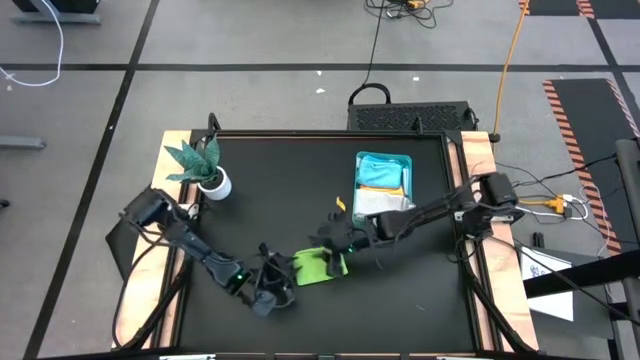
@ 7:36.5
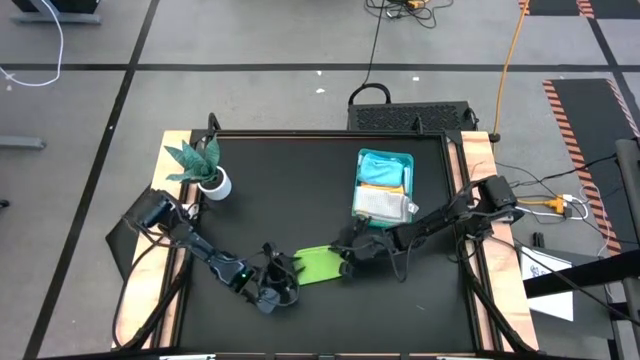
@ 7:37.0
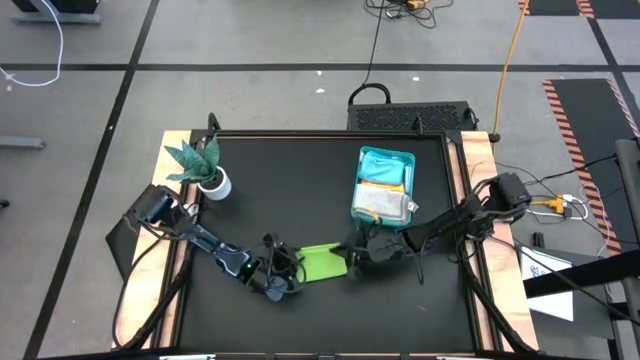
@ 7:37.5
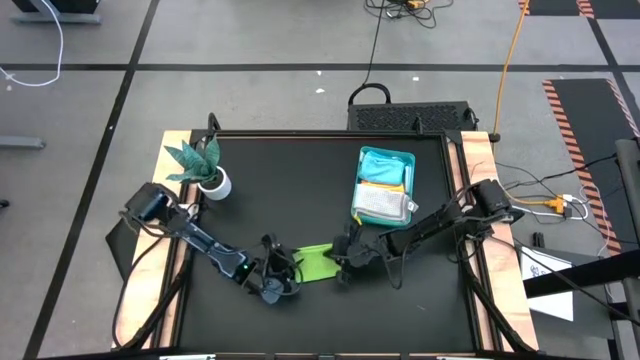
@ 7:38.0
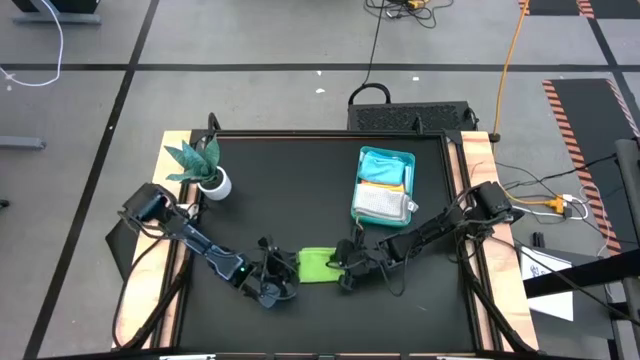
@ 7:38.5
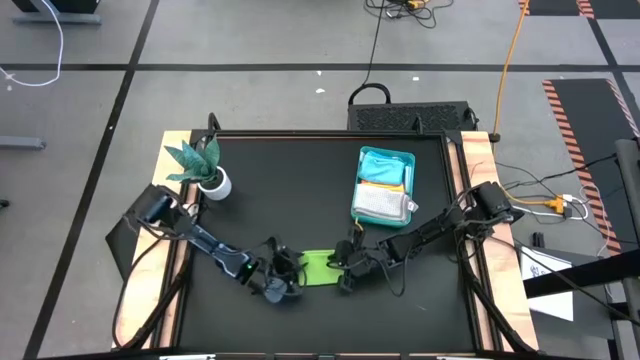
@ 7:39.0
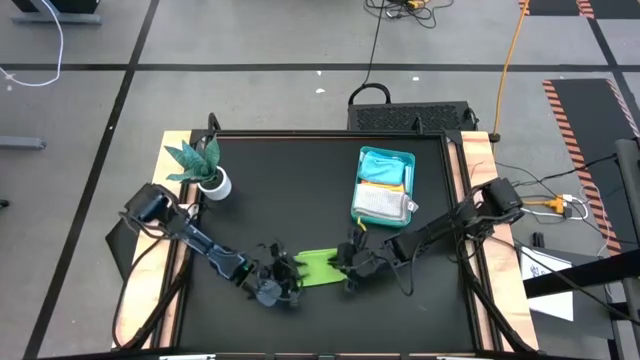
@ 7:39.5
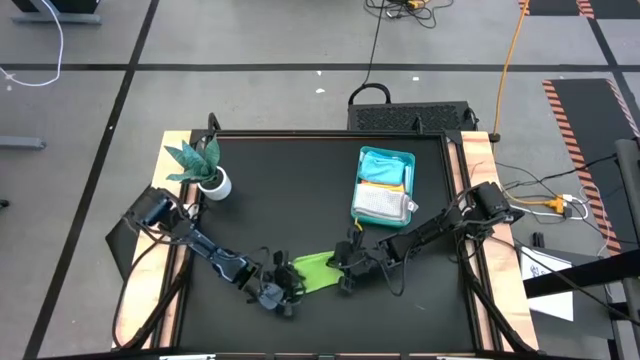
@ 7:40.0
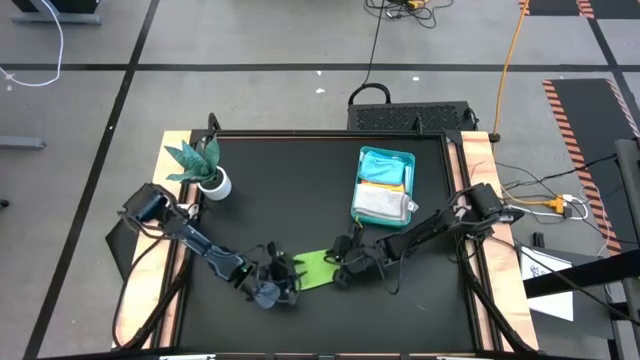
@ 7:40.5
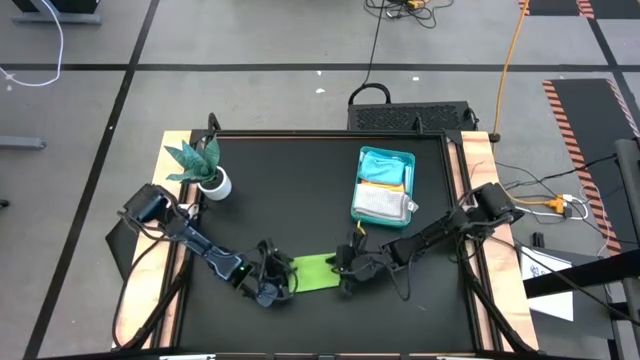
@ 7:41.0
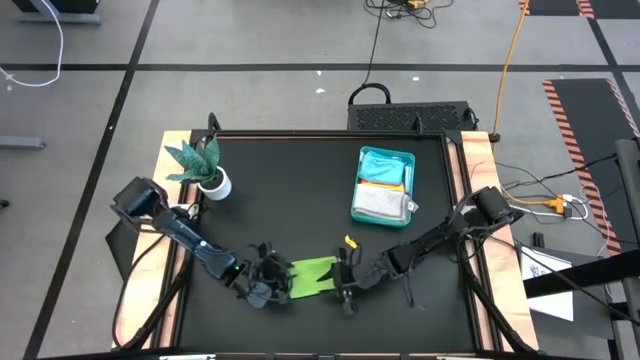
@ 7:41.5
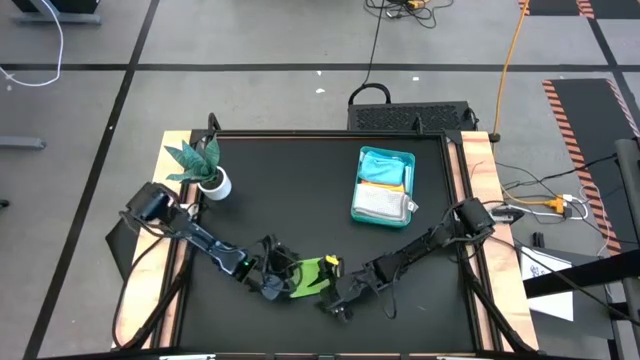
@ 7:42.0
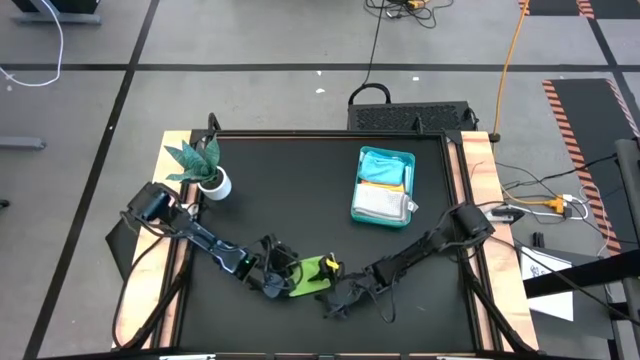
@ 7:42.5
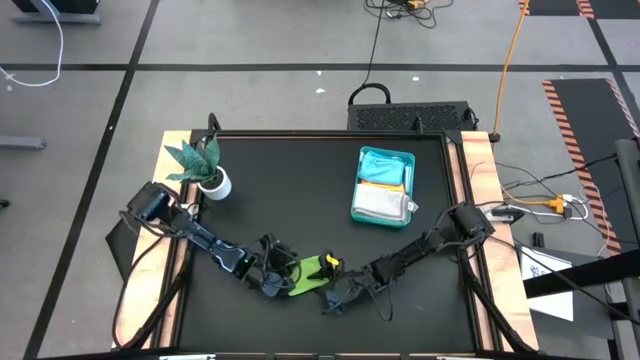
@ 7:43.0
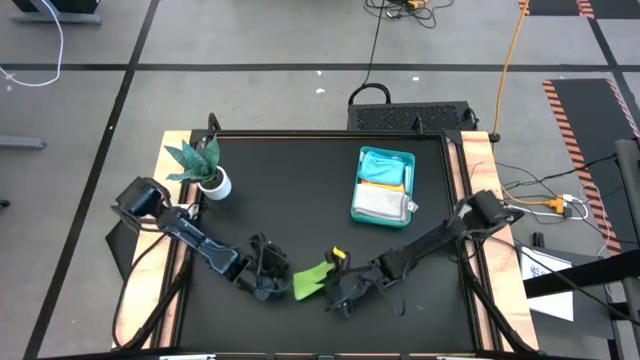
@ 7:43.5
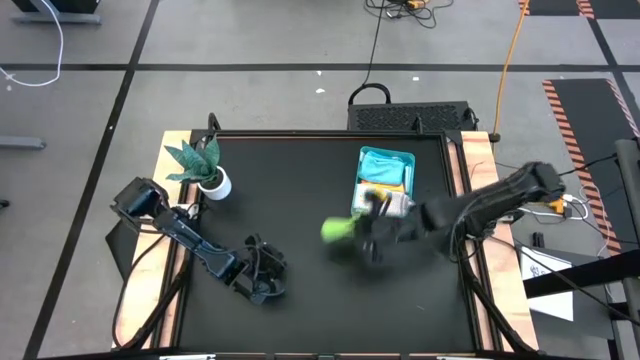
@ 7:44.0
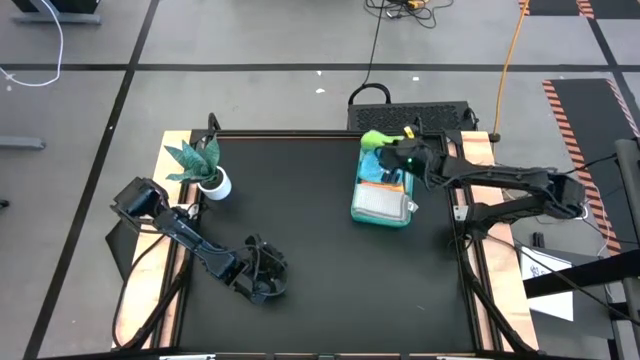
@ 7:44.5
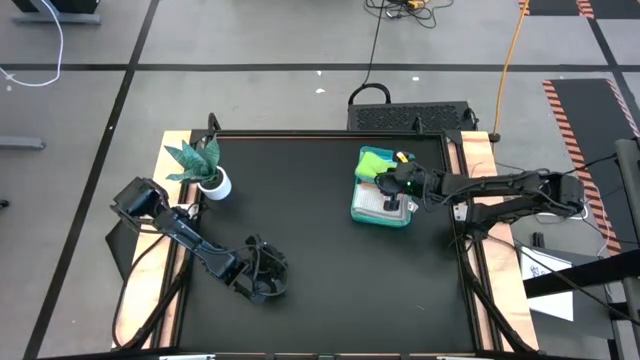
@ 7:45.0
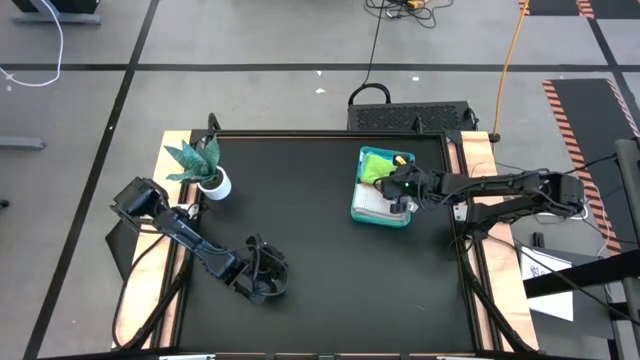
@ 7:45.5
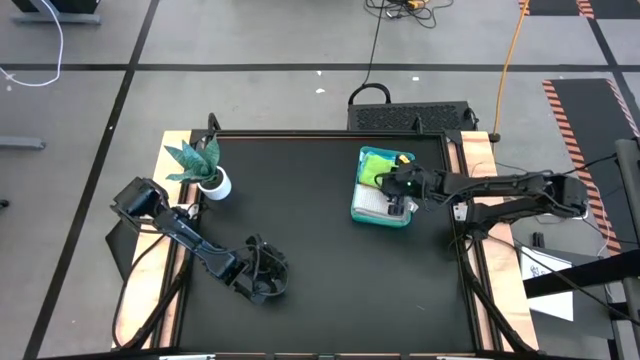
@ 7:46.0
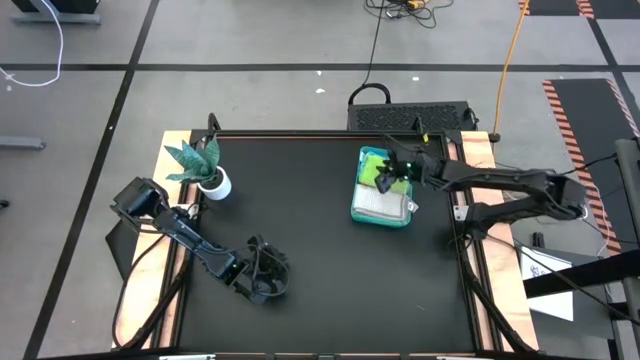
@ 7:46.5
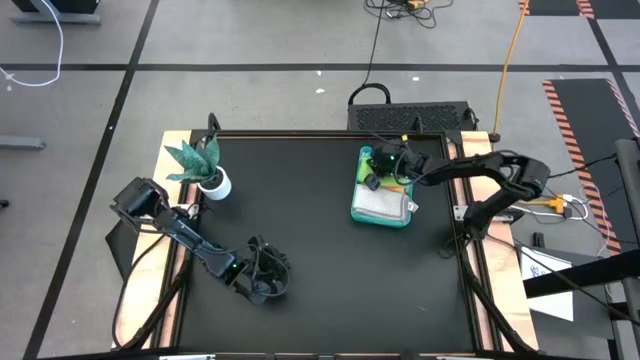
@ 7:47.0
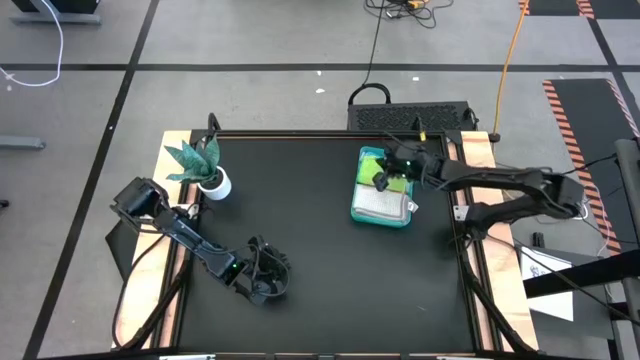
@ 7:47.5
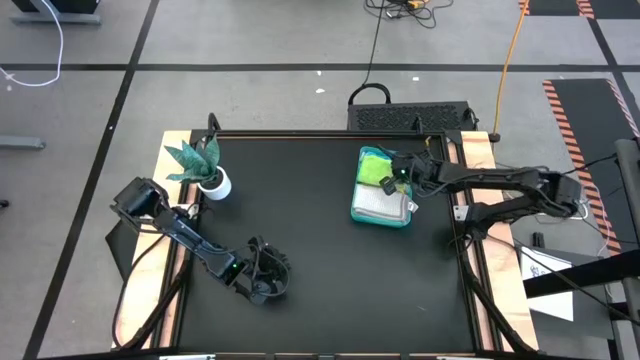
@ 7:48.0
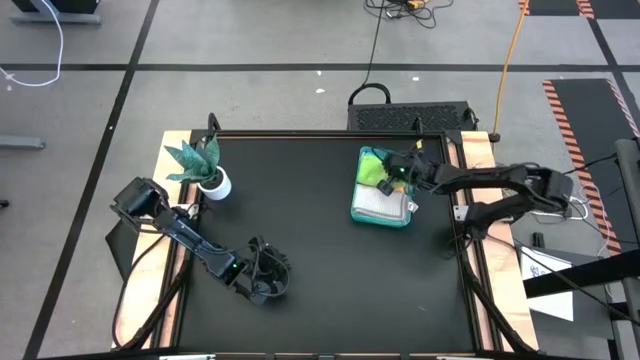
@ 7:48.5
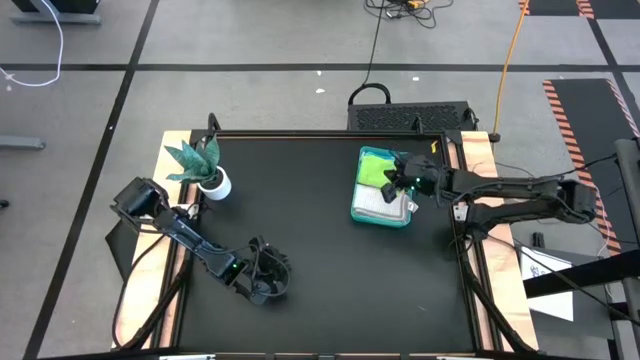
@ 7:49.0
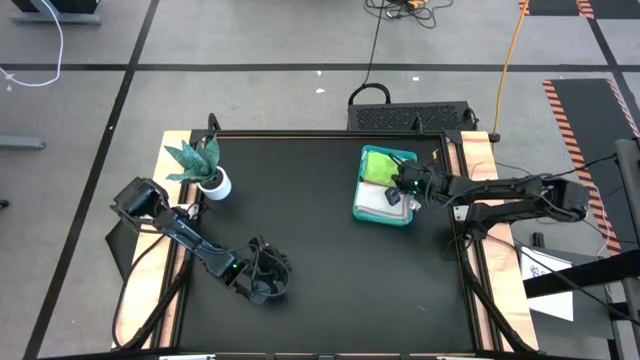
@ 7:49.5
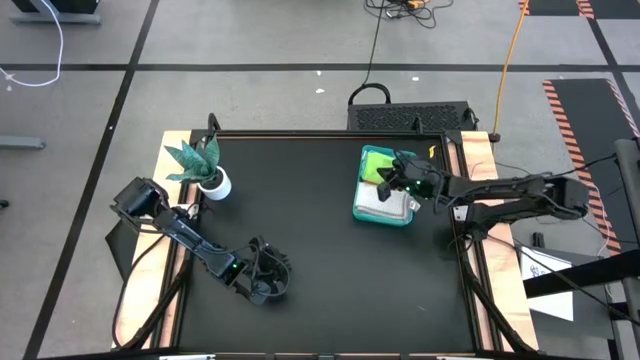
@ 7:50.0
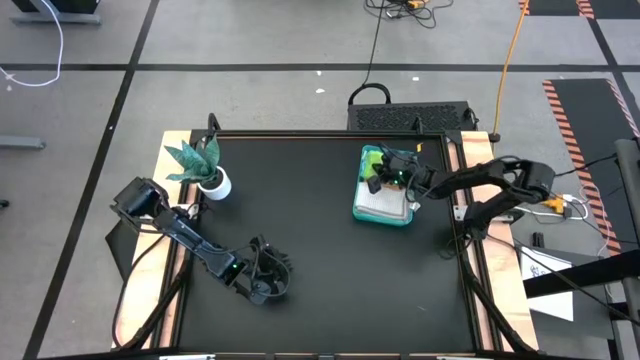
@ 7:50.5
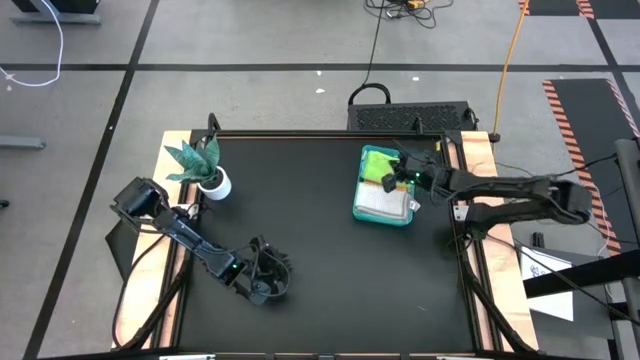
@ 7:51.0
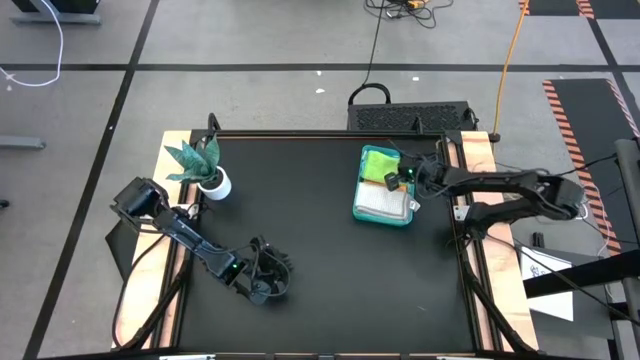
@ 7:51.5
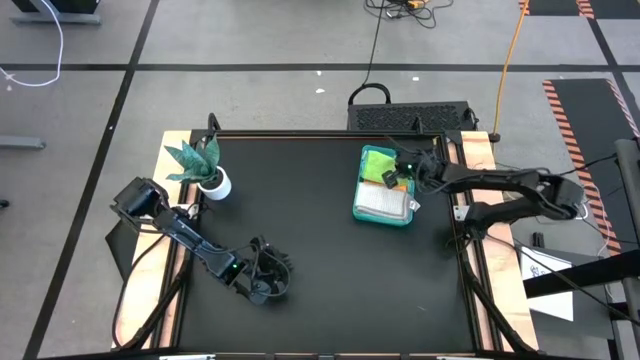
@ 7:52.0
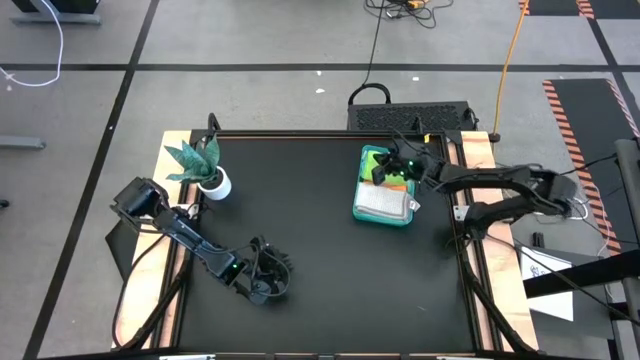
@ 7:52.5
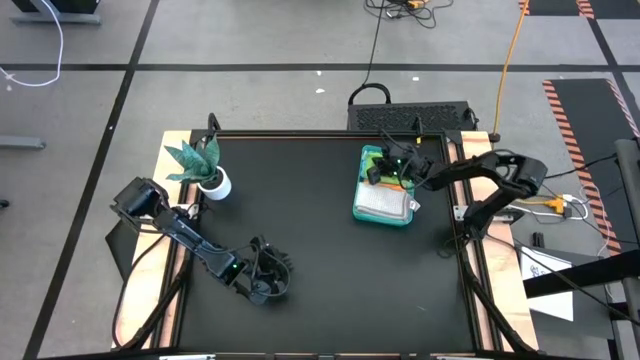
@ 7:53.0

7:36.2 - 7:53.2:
Task: Fold microfiber towels
Stack the light green microfiber cloth on top of the blue microfiber cloth in the green bin

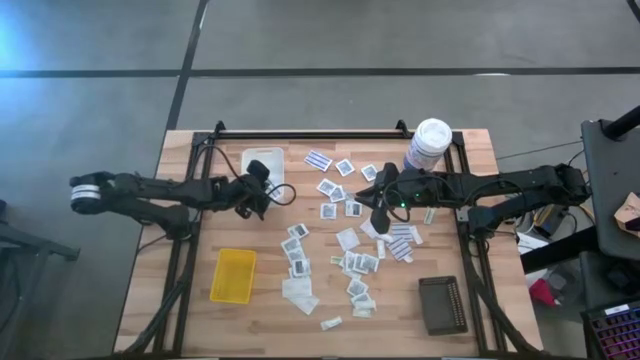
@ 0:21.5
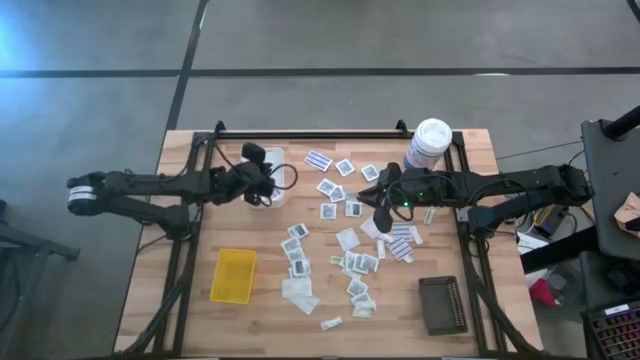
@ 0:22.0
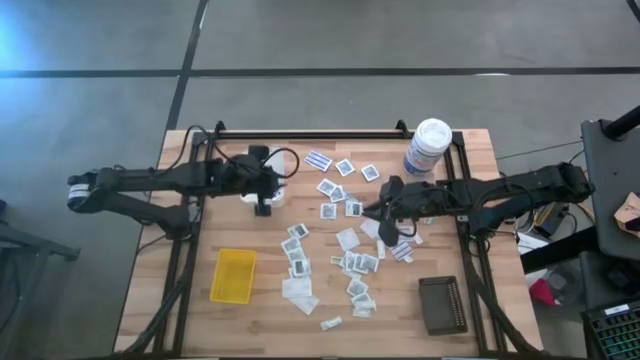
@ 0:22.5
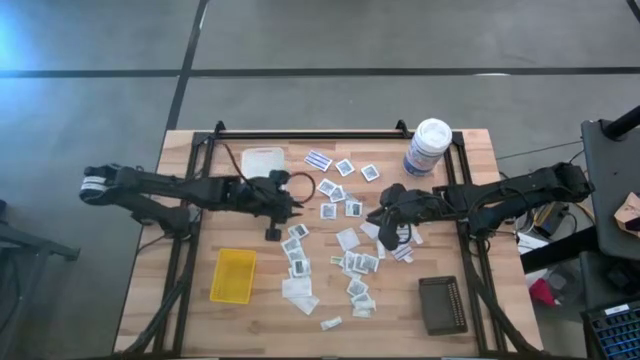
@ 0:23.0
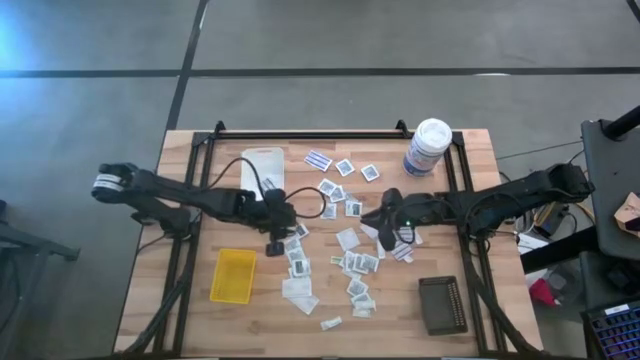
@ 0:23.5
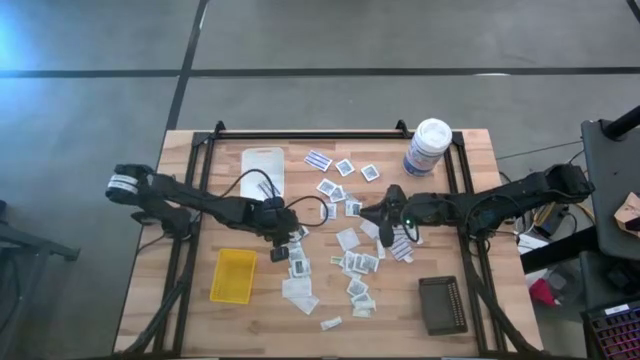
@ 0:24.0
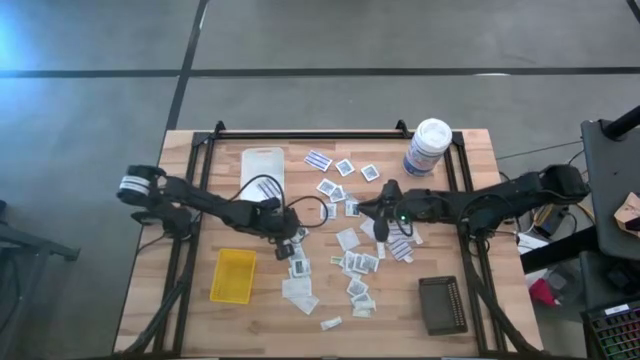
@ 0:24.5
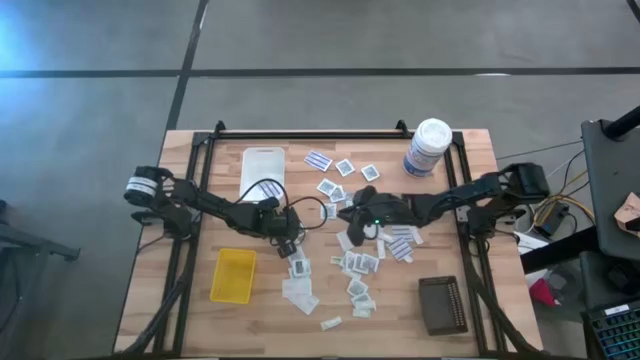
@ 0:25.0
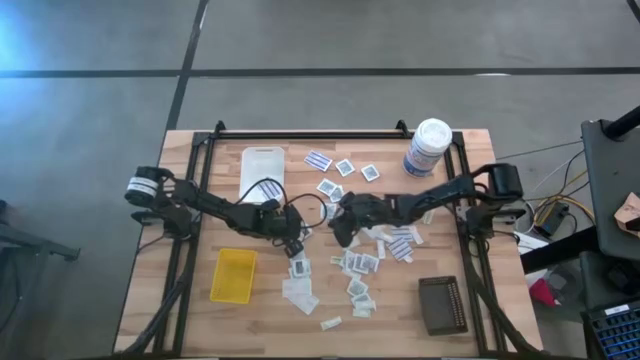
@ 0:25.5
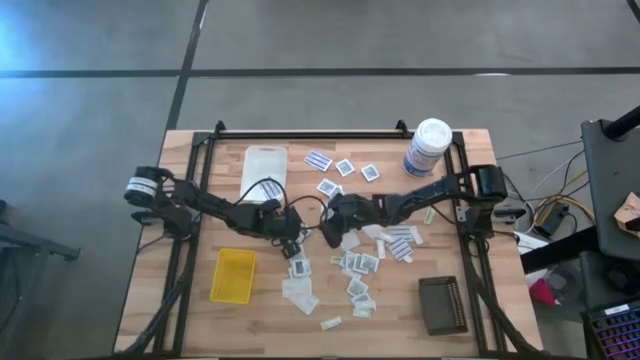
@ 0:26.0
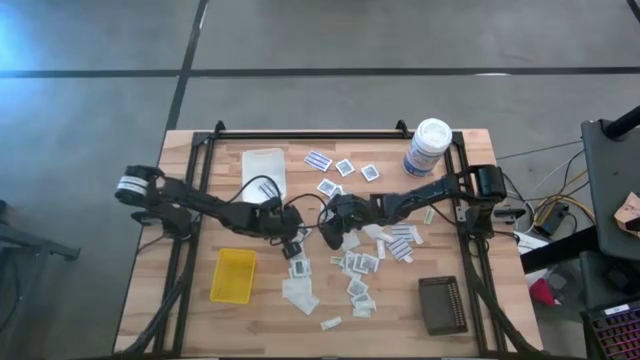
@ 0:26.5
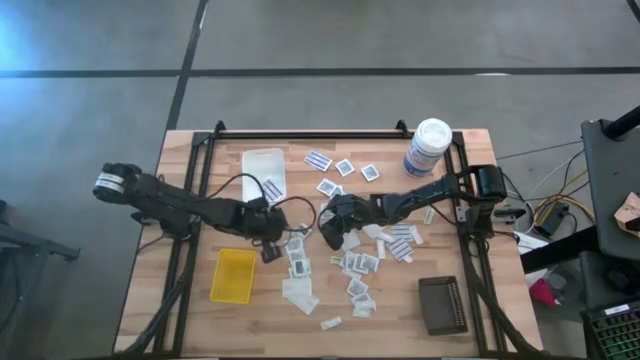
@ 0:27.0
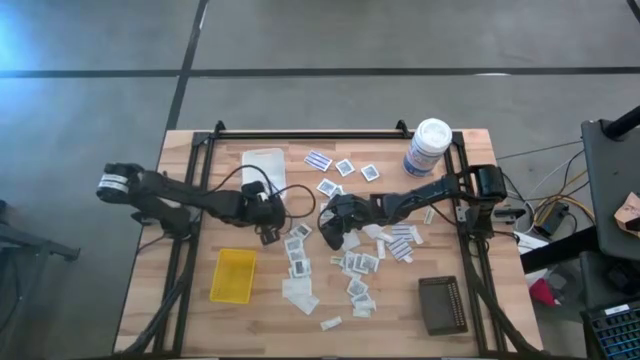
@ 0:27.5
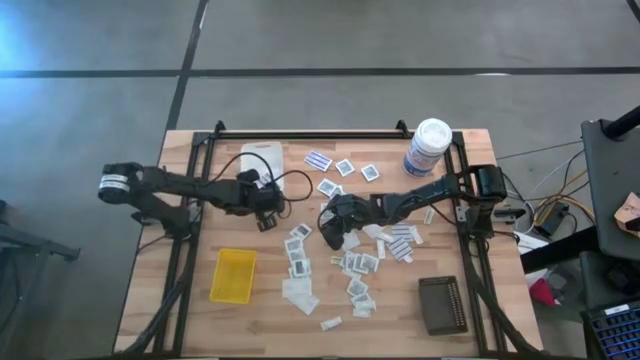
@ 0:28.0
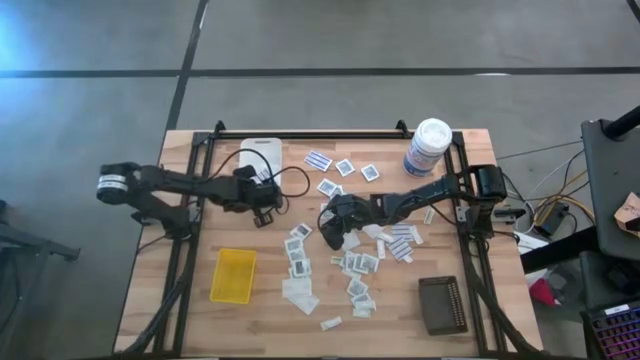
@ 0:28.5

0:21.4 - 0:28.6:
Task: Pick & Place First Aid Supplies
Adjust the white bin
